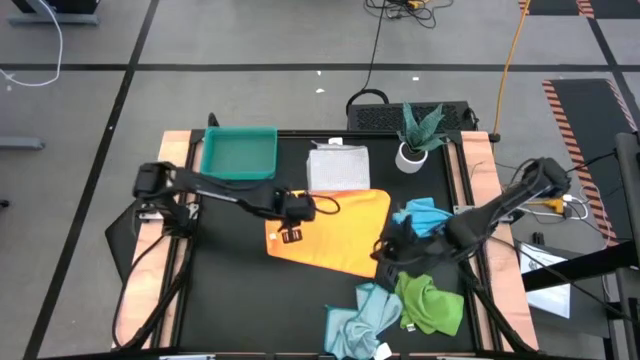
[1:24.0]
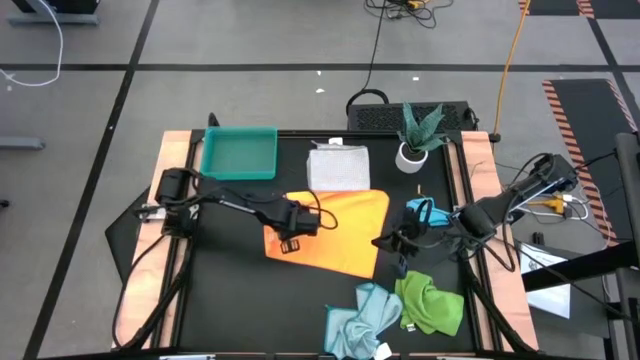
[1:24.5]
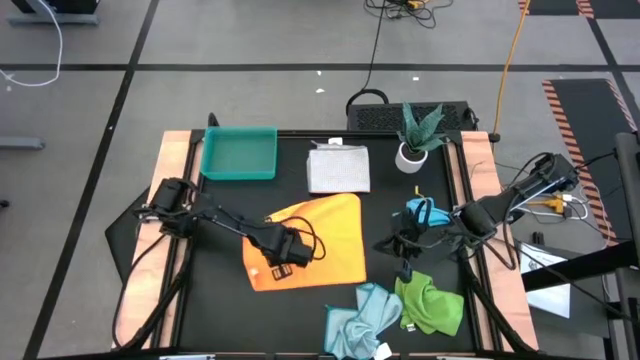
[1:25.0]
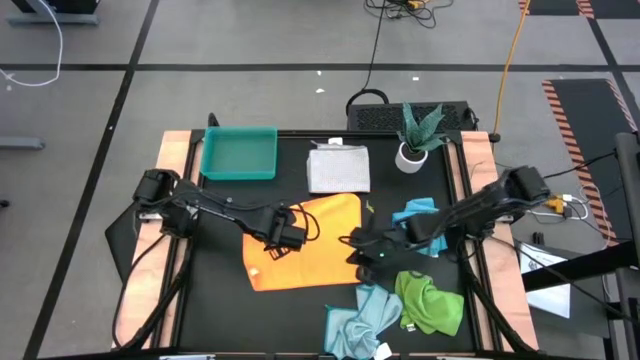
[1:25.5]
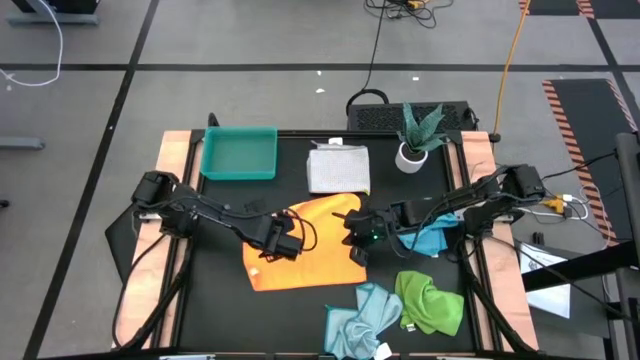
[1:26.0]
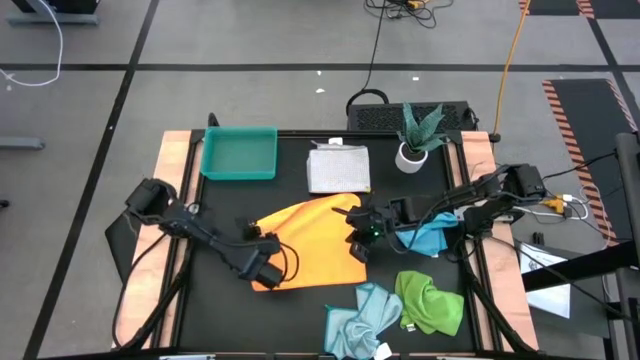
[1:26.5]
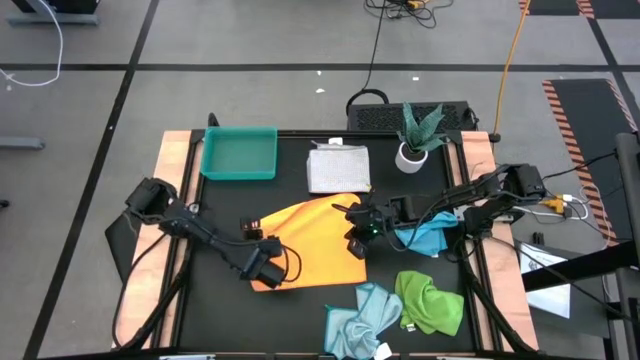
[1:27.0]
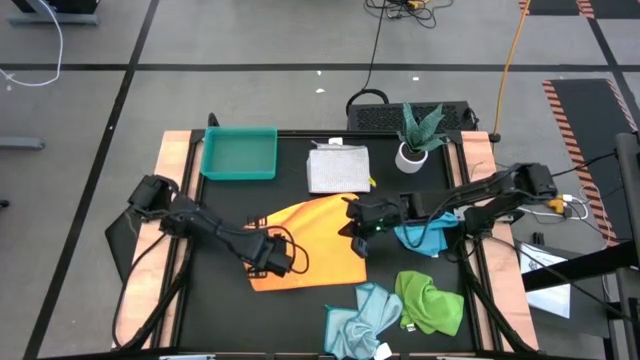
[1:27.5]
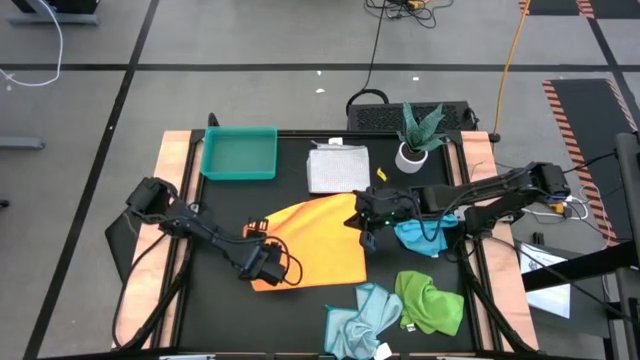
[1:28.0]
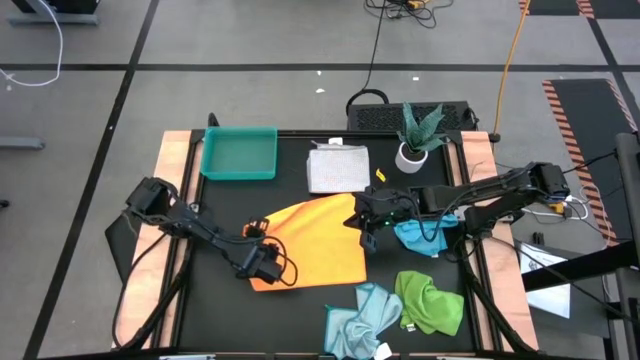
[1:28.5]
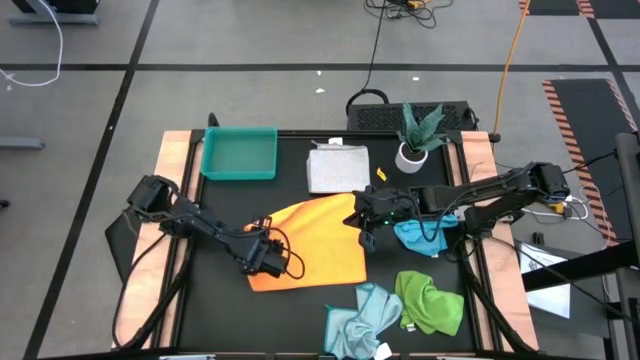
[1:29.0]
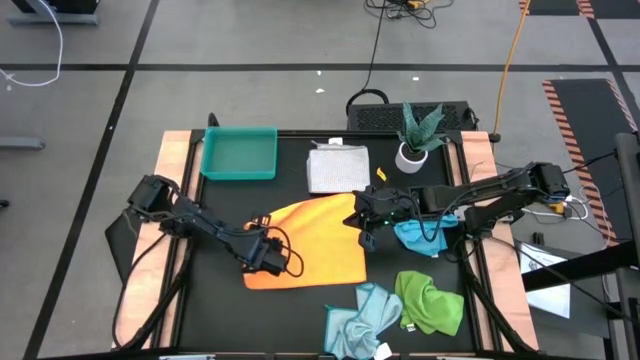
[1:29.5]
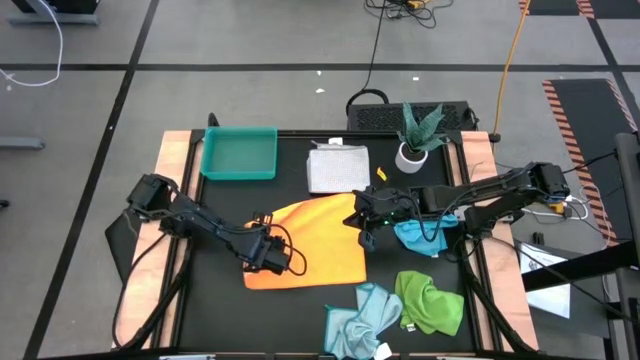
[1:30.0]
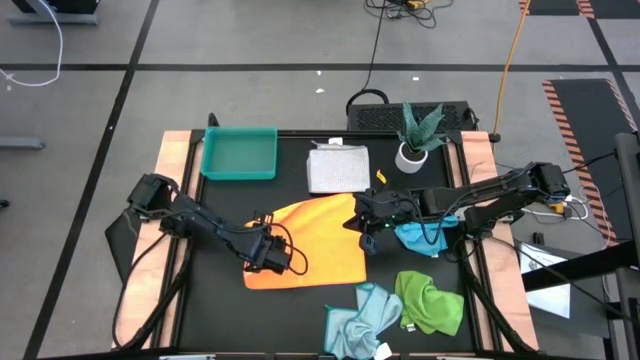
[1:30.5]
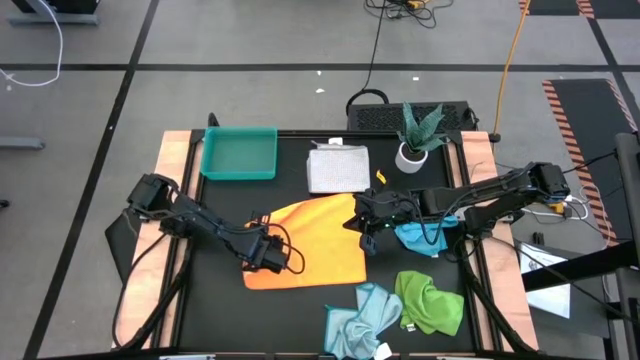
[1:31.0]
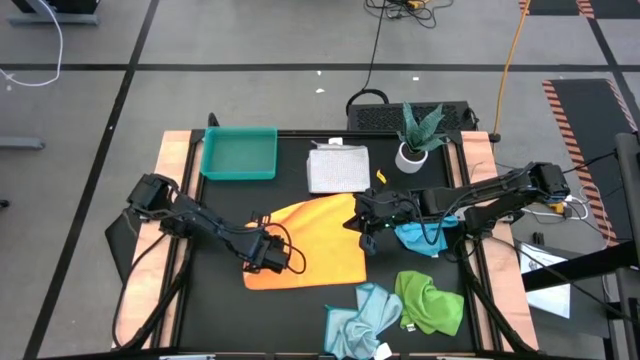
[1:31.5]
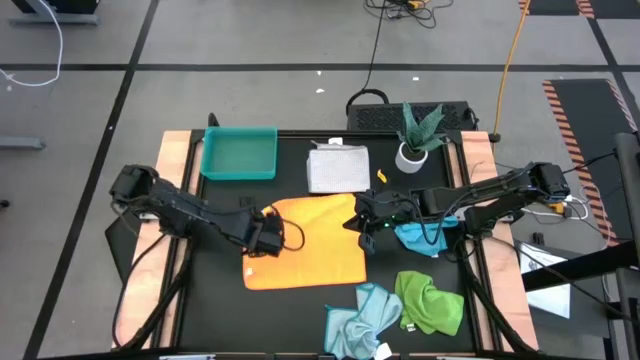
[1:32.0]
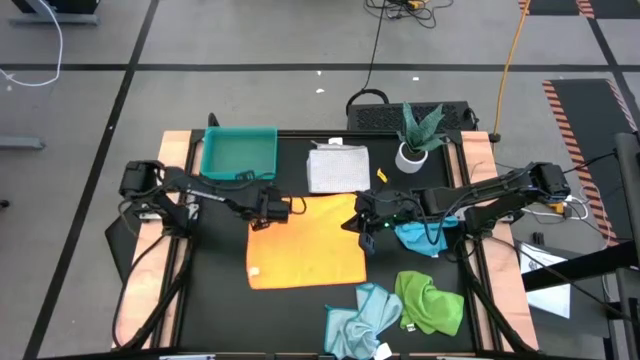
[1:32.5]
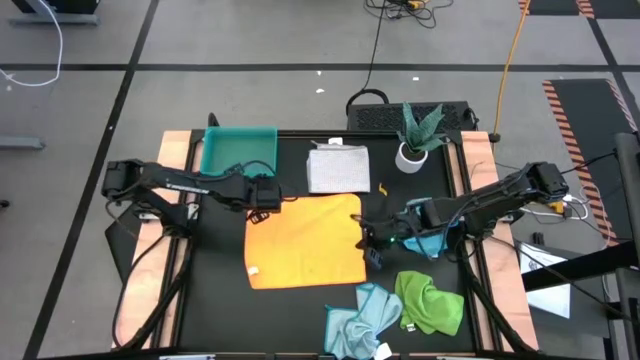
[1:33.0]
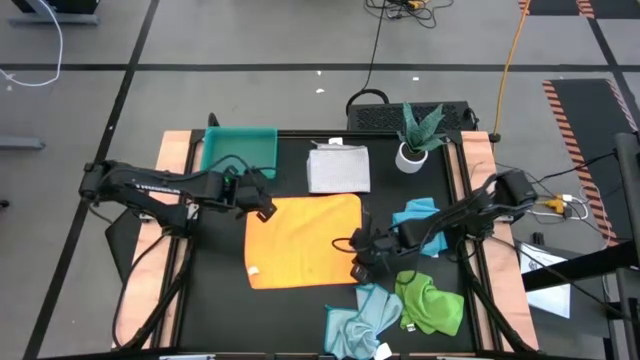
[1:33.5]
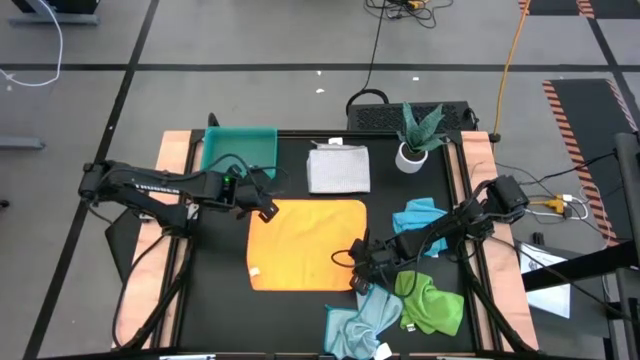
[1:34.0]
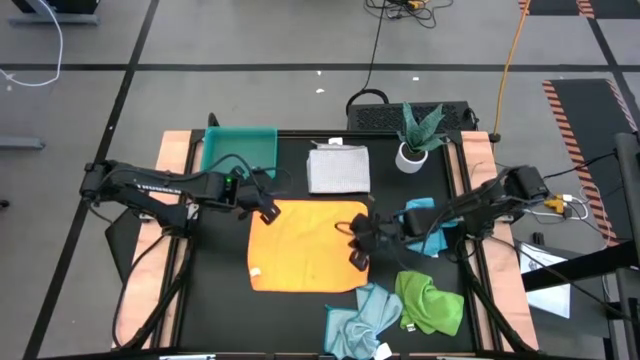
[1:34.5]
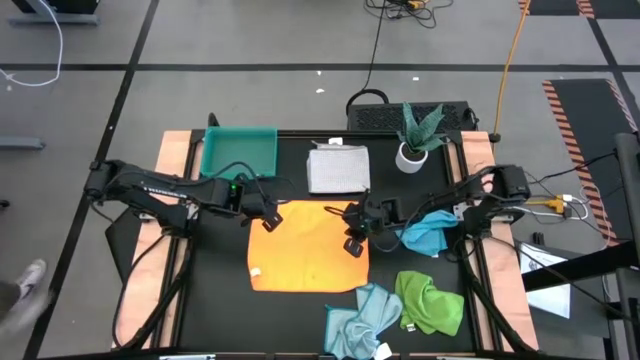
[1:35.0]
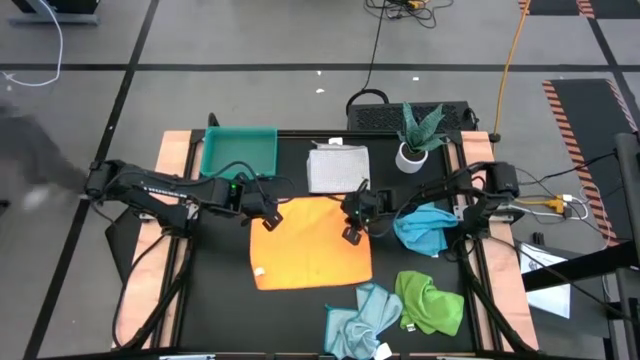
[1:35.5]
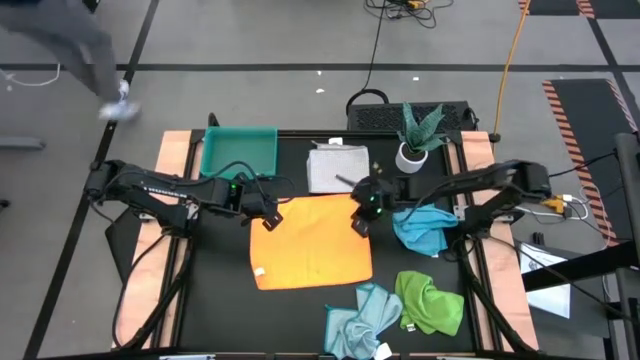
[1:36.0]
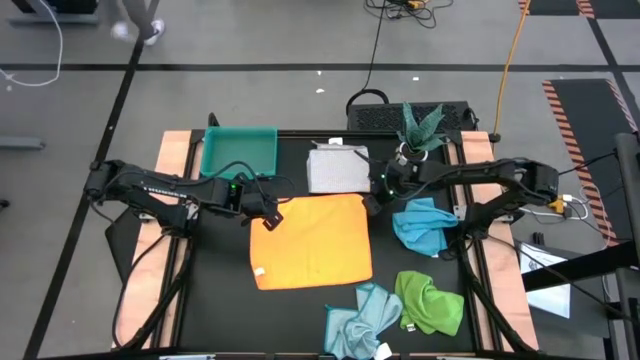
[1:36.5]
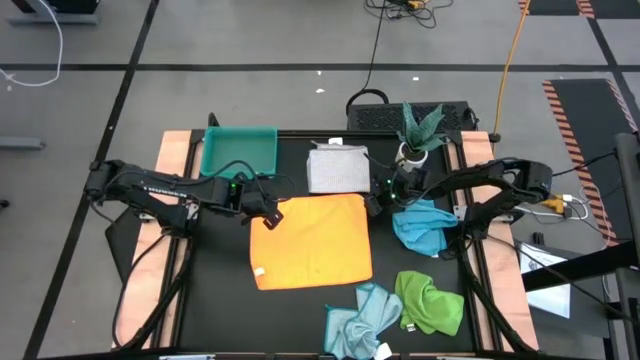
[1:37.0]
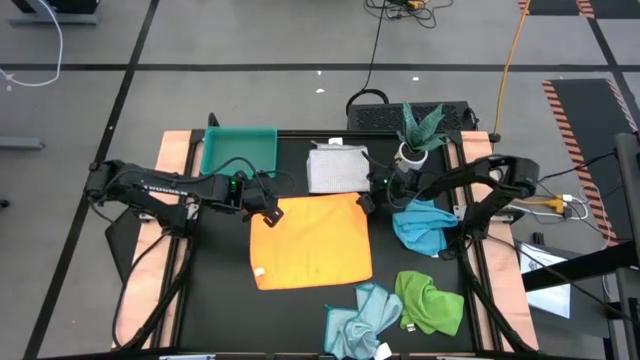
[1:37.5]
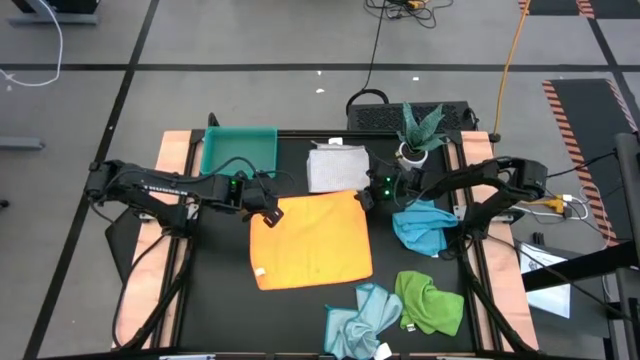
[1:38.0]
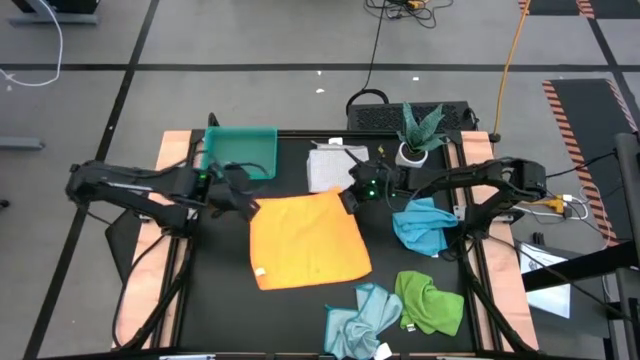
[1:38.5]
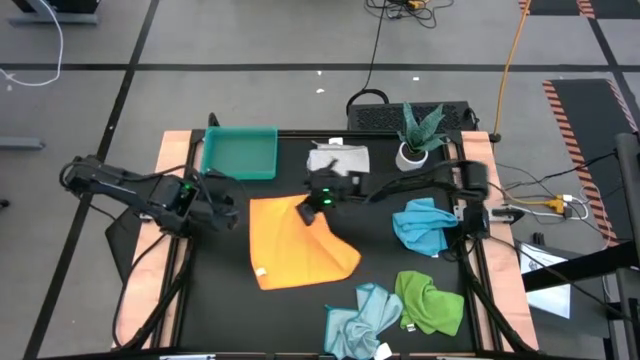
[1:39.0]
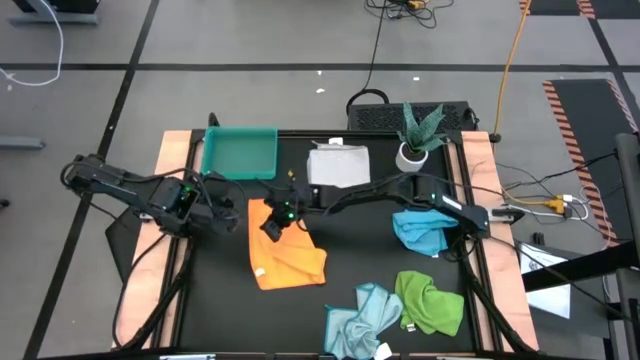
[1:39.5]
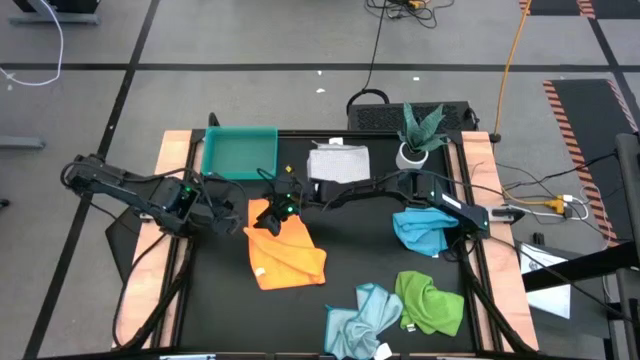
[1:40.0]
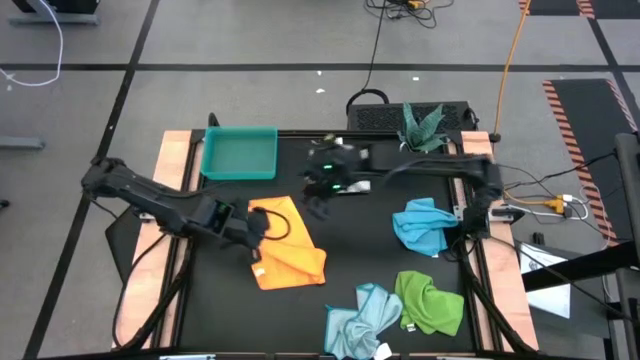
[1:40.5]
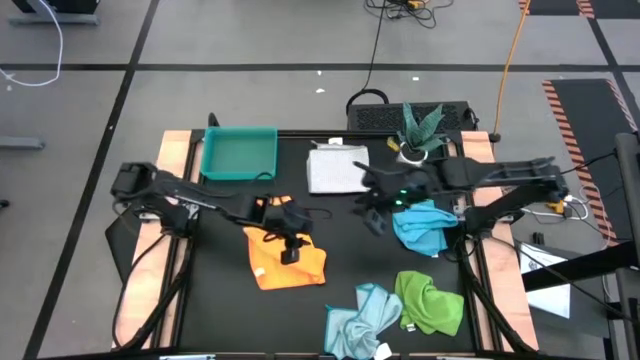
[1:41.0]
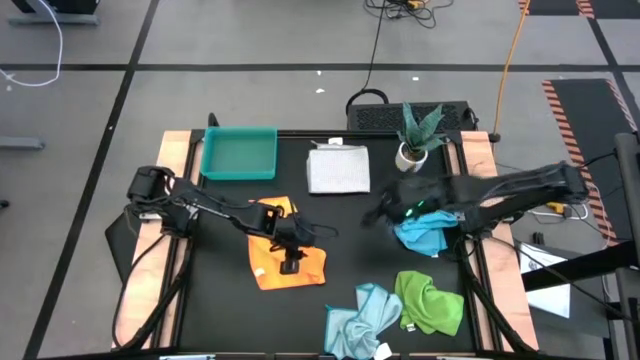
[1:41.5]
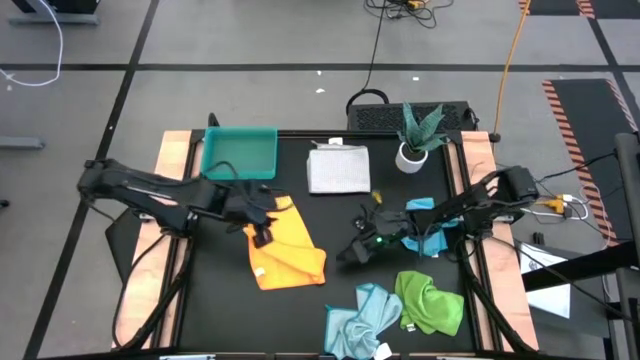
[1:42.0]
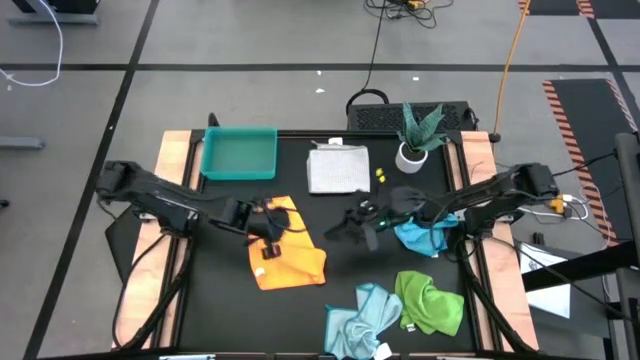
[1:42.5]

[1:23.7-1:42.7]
Task: Fold microfiber towels
Fold the orange microfiber towel

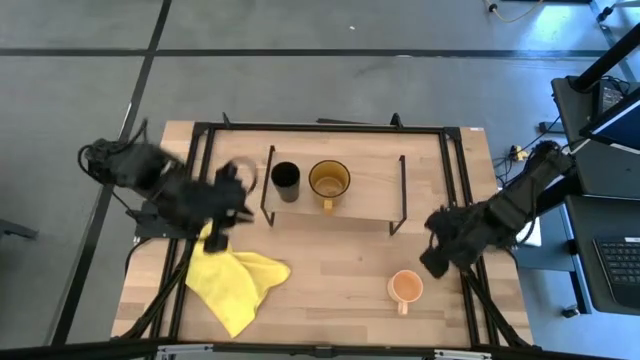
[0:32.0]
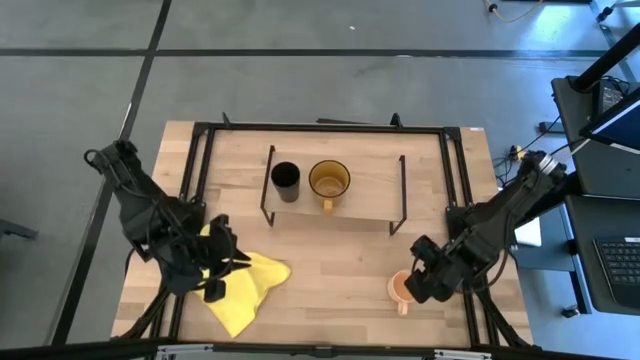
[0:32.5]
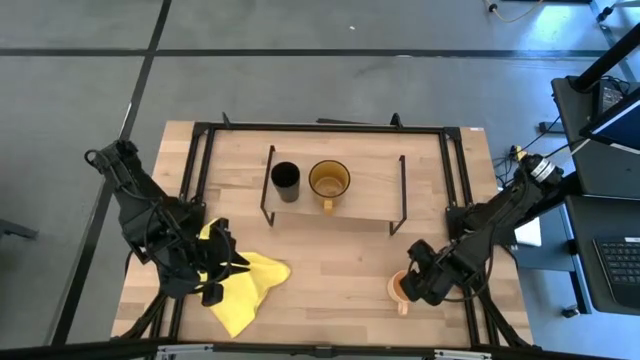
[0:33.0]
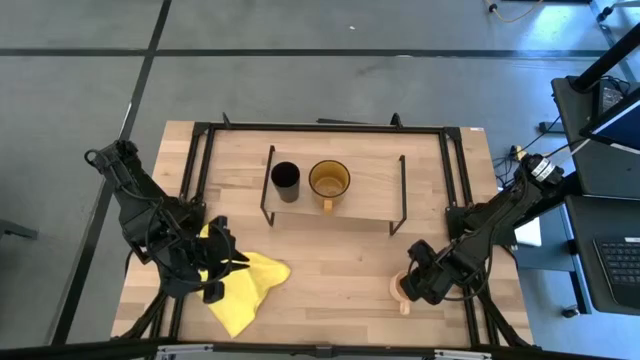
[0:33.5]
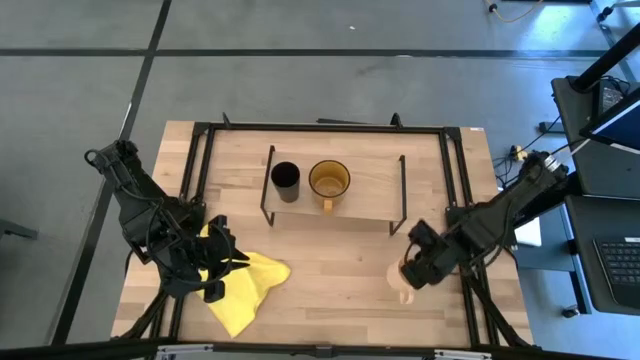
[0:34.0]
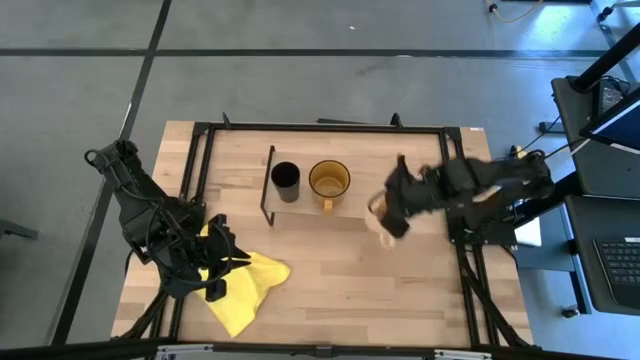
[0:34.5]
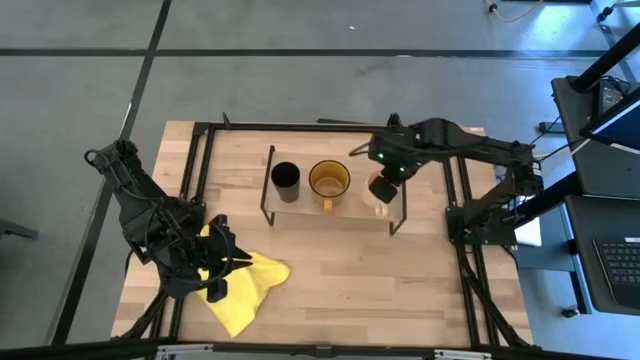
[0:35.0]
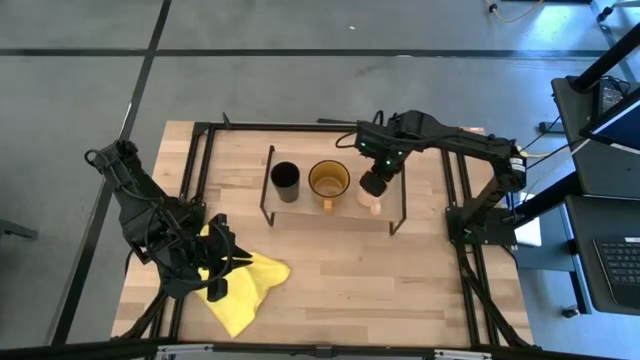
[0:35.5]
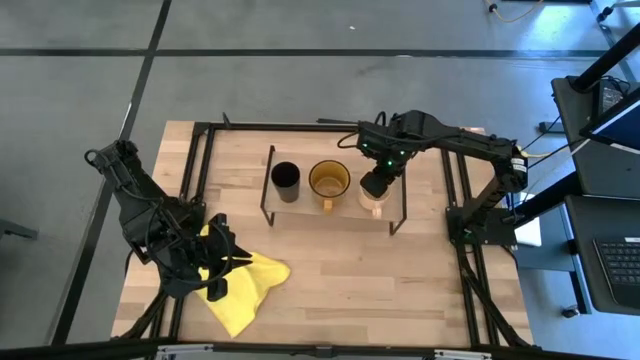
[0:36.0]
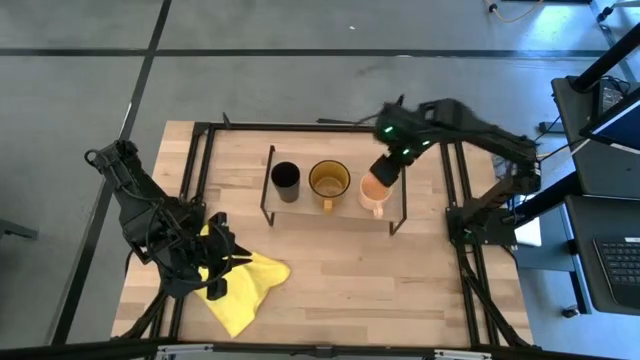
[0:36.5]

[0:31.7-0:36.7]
Task: Stack small to large cups/mugs on shelf
Put the orange mug on the shelf
